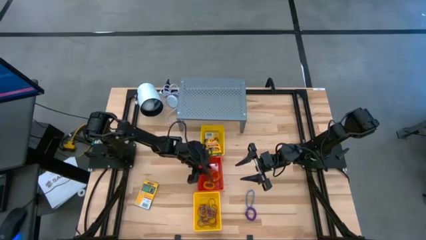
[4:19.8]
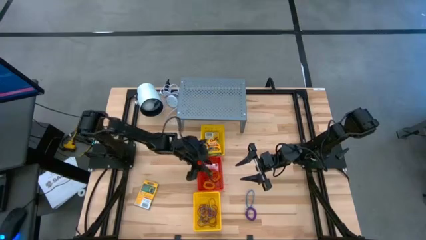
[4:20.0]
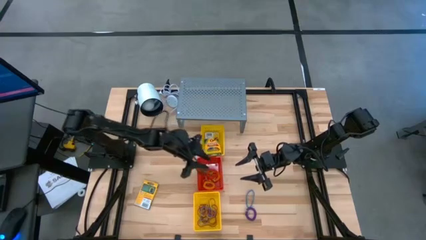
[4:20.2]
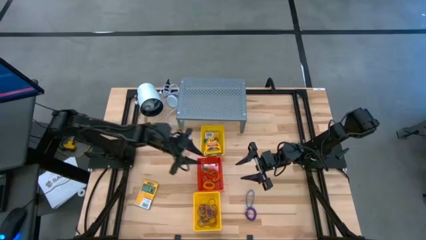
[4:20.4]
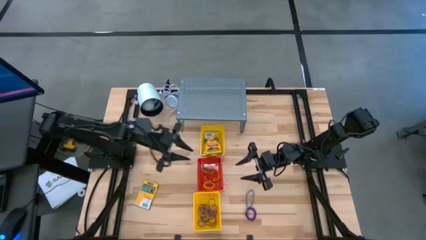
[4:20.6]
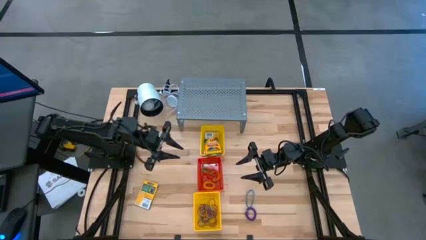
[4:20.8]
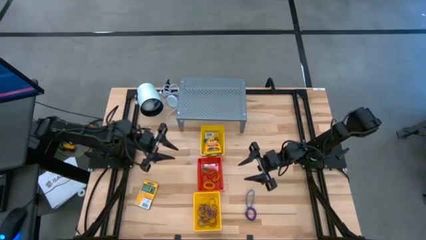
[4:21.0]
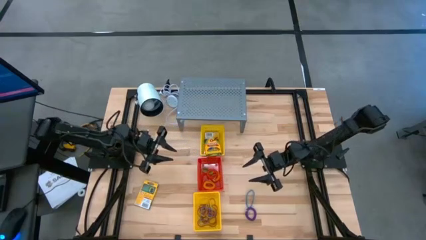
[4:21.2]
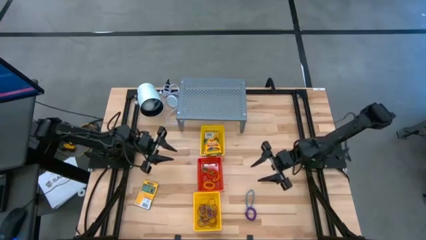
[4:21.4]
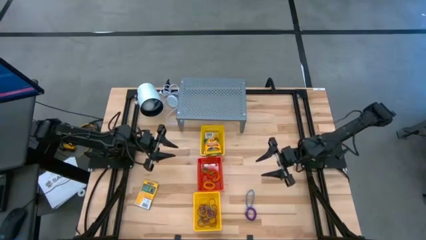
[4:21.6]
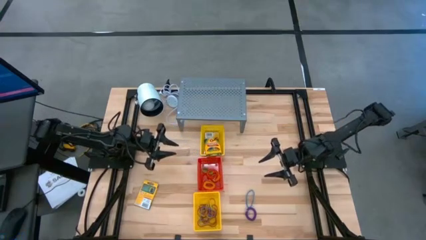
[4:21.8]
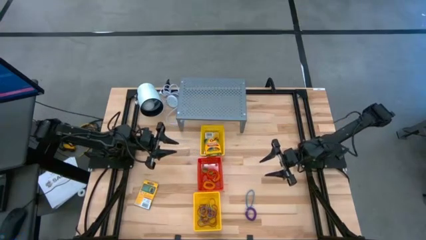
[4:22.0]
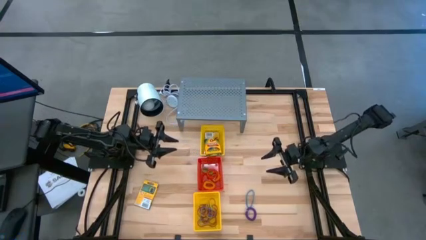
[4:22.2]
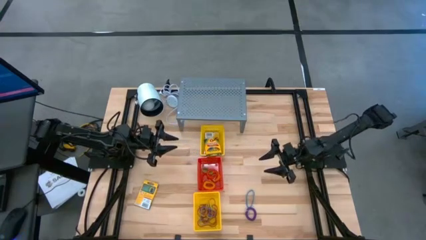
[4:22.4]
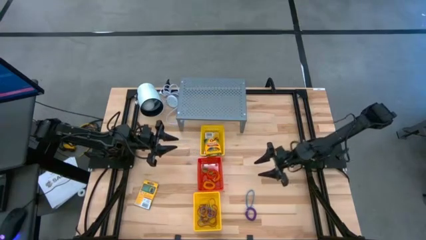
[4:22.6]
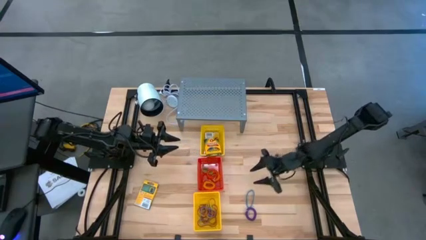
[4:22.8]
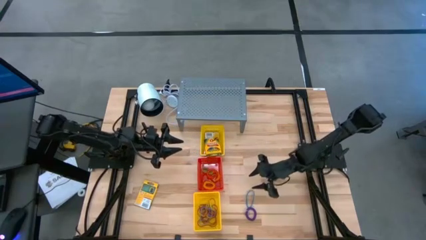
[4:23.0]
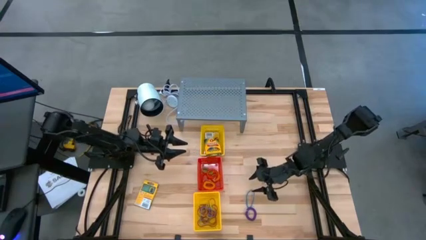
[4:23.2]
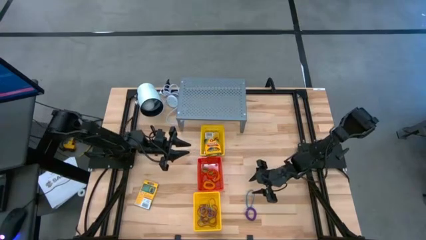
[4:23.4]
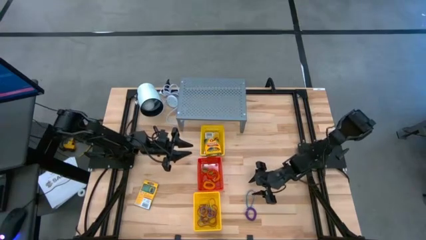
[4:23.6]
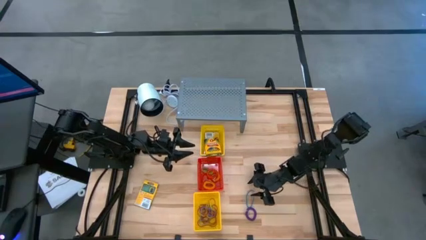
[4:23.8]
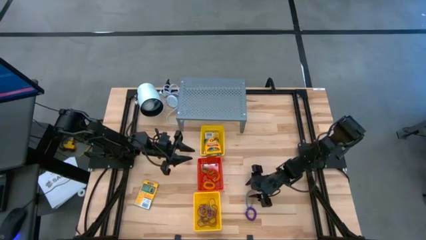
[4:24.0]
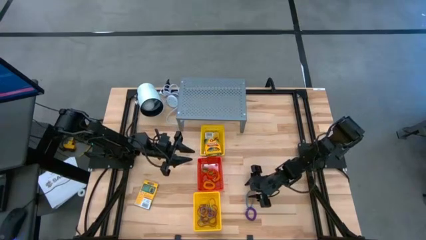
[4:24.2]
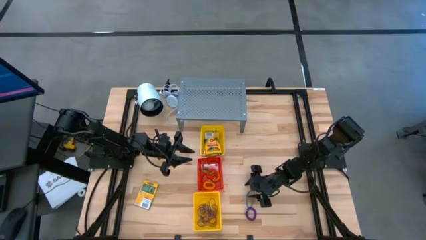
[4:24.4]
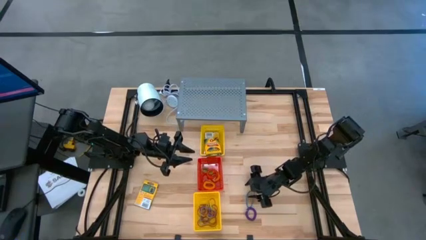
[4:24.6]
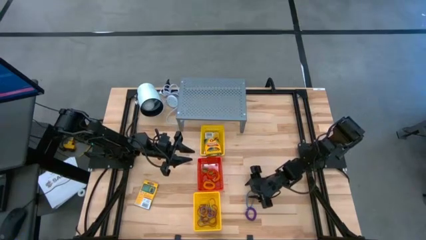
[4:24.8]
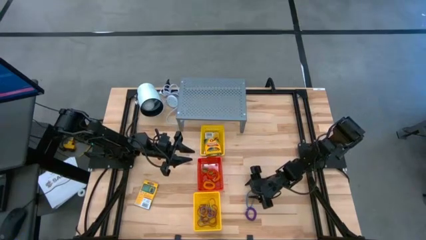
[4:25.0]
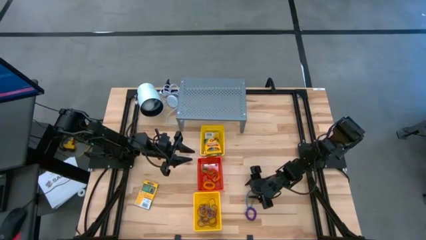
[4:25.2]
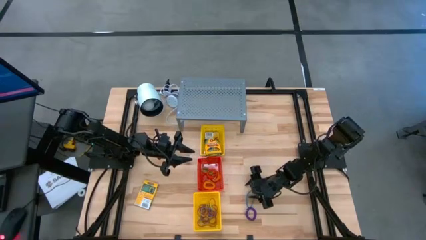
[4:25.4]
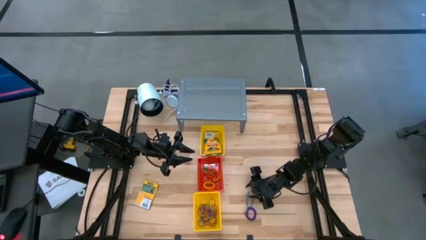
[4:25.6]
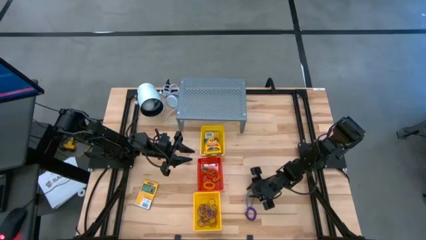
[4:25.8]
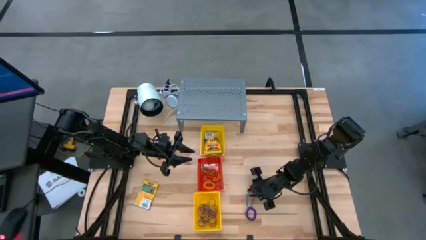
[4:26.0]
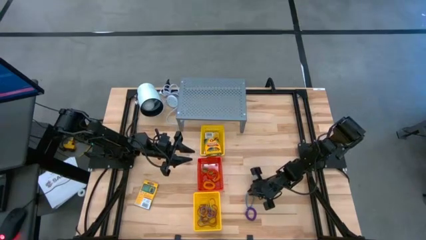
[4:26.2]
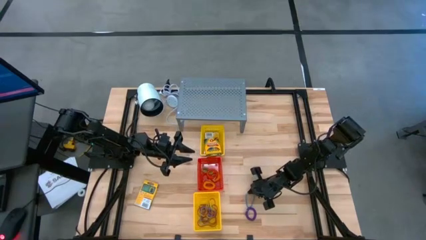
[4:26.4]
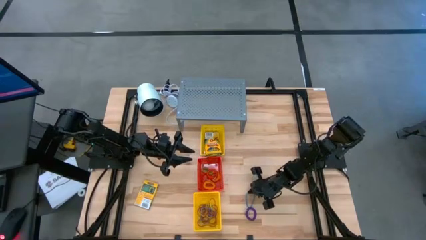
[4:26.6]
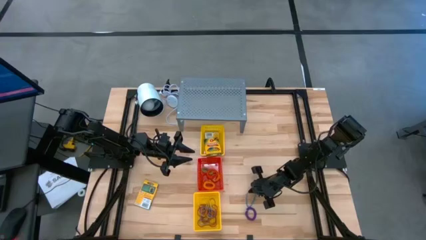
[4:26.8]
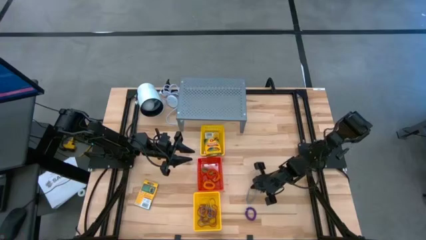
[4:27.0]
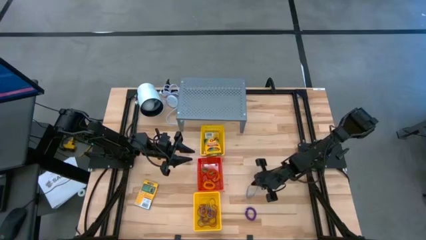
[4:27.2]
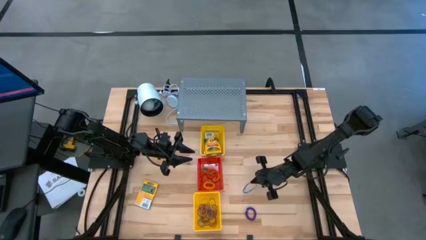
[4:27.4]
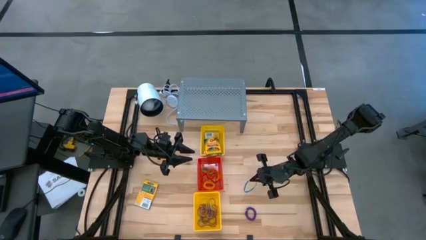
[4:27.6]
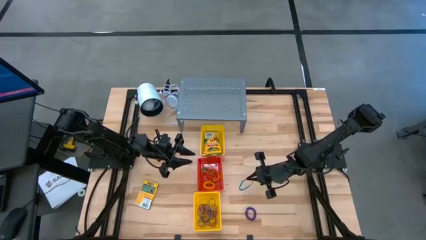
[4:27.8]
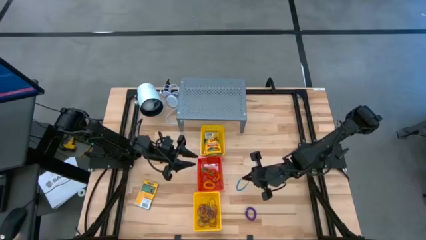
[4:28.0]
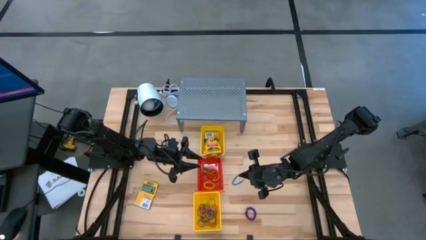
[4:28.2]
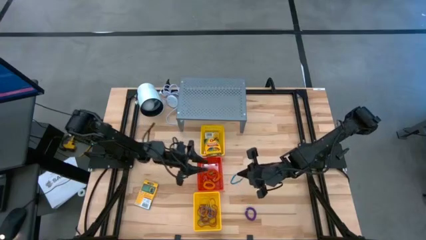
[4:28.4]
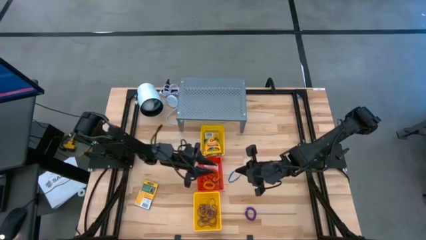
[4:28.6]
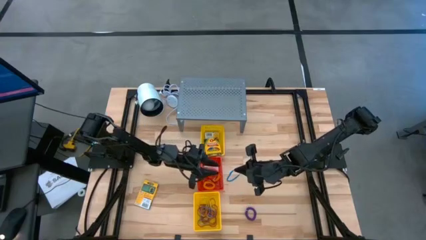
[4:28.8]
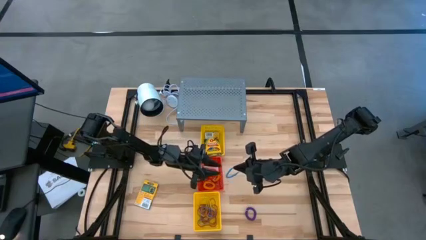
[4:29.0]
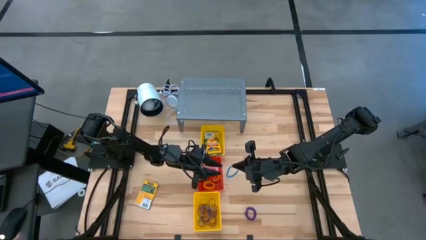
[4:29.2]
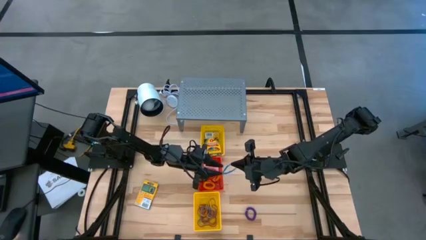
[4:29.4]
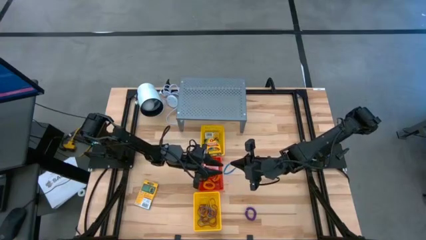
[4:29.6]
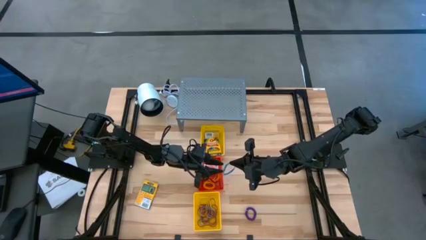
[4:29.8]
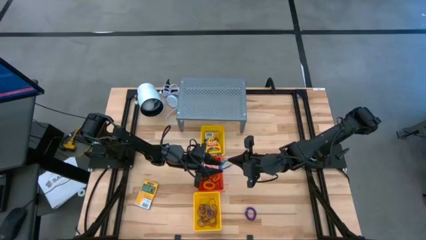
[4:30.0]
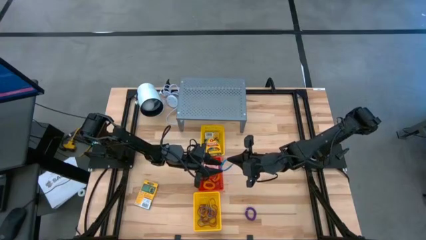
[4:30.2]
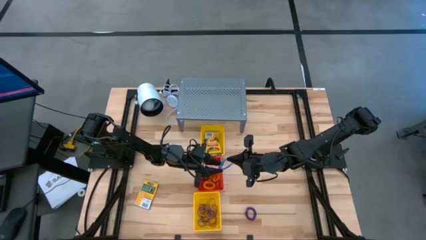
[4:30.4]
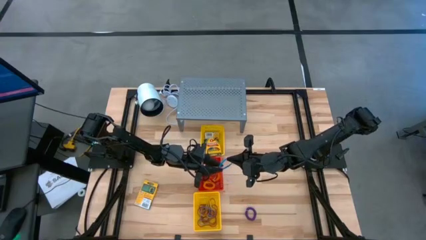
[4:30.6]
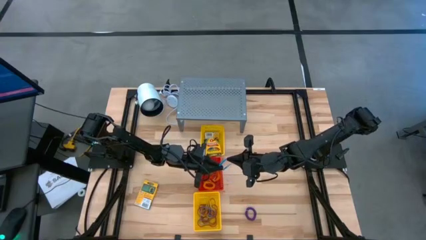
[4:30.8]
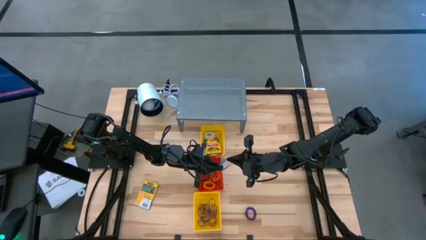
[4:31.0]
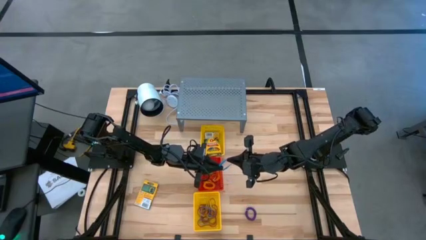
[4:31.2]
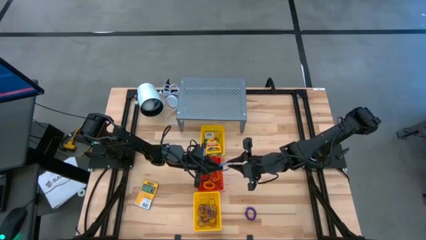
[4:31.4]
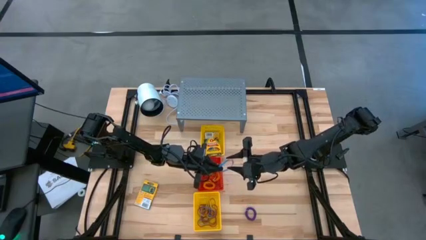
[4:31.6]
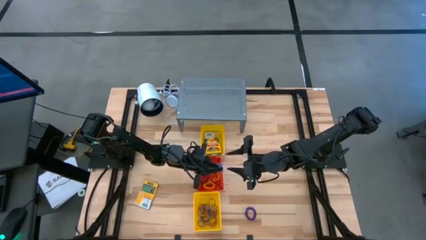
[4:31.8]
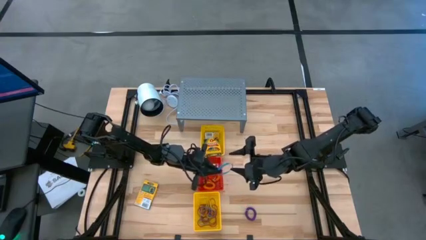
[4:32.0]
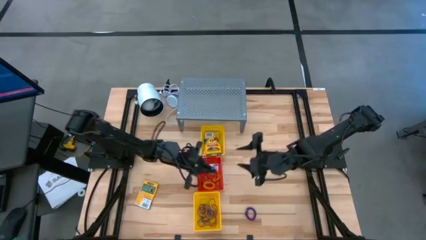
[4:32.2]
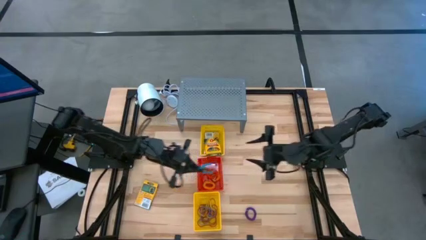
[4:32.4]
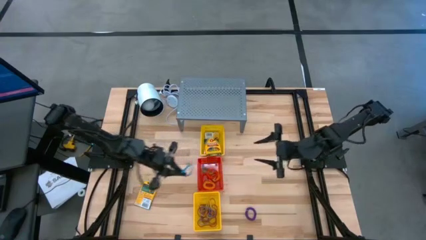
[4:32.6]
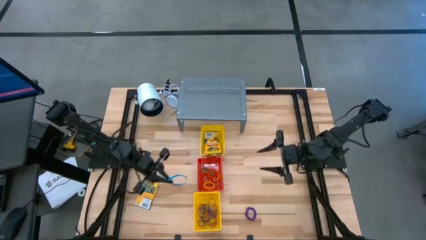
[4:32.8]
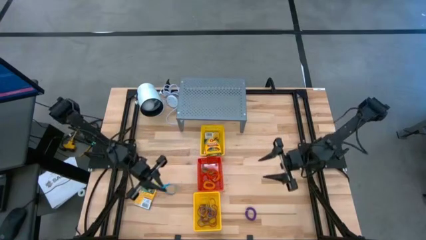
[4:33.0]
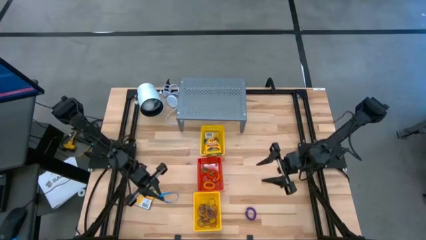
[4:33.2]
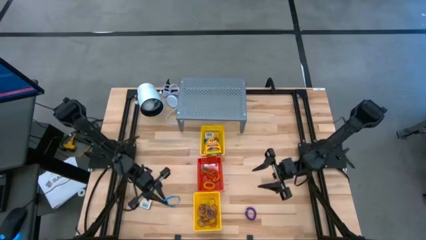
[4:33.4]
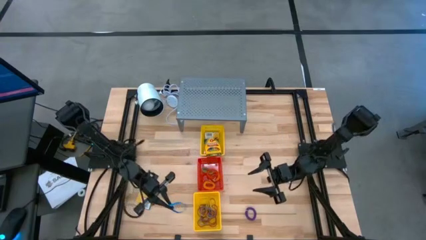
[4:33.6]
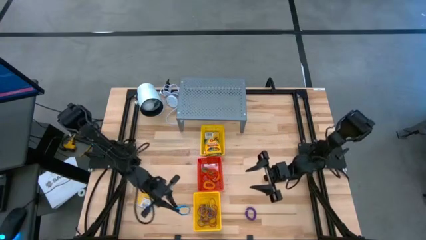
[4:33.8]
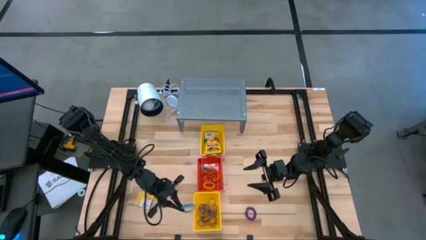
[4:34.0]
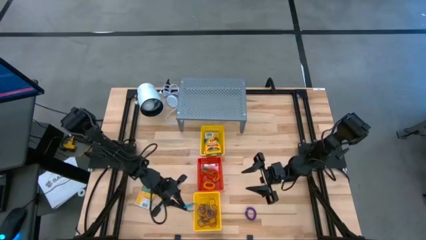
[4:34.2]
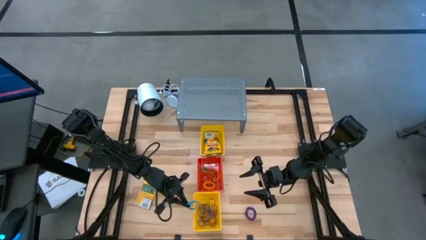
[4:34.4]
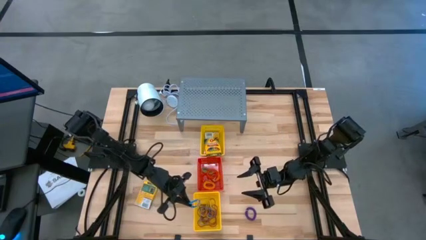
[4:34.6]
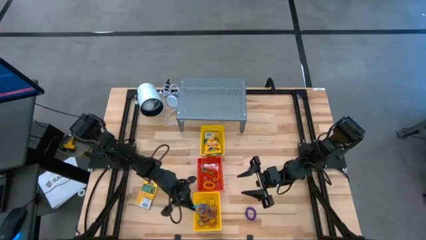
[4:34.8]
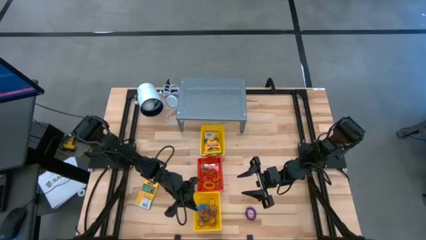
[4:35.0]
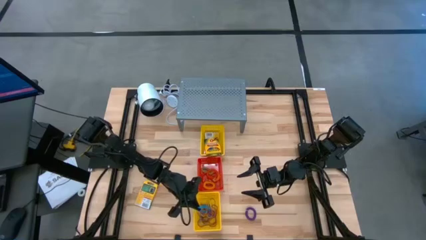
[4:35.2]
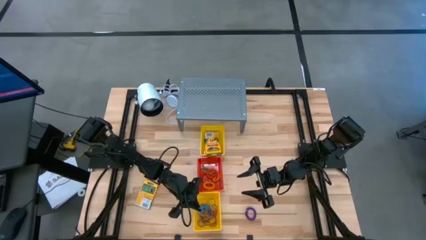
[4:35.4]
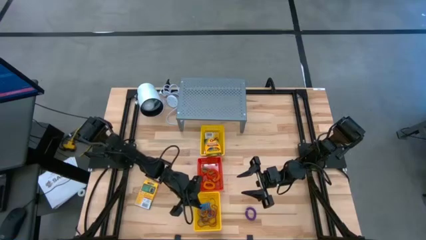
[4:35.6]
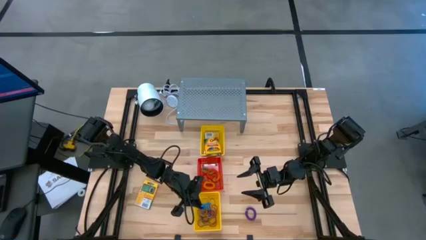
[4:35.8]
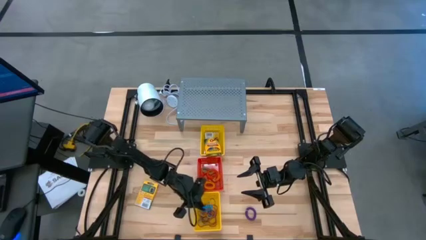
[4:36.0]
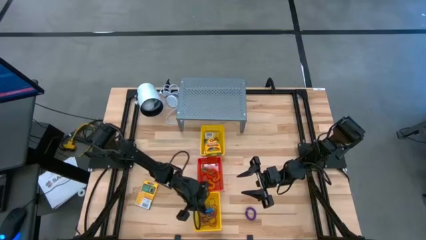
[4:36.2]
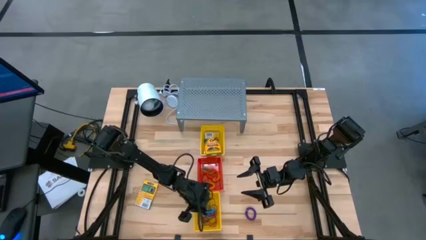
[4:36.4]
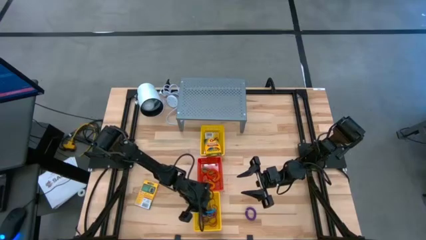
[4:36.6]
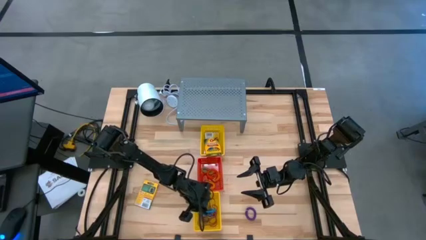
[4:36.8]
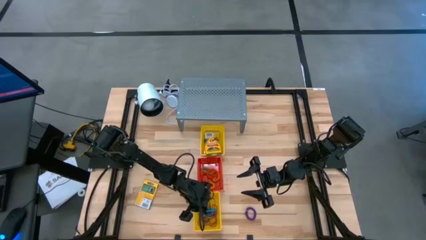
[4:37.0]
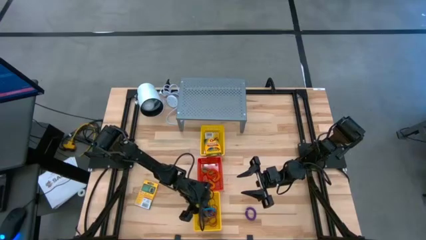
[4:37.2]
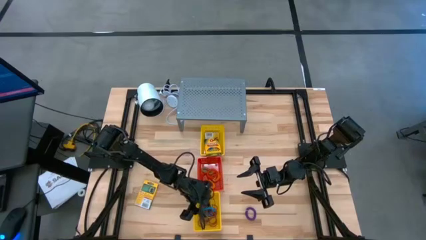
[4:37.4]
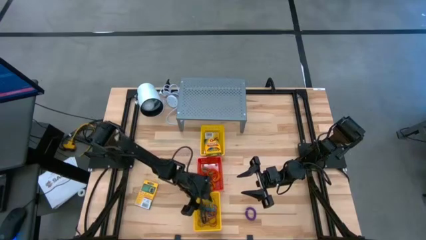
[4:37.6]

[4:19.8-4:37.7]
Task: Pick & Place Office Desk Supplies
Put the blue rubber band into the bottom yellow bin
